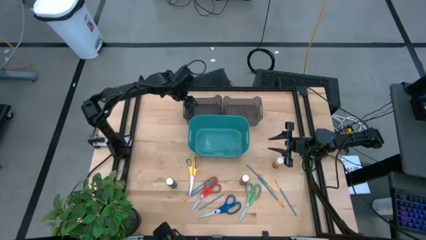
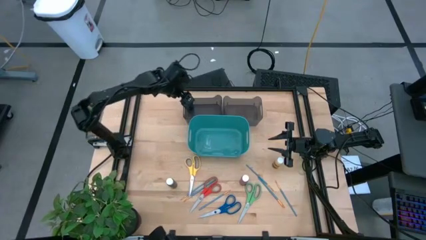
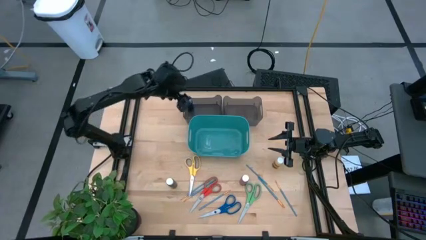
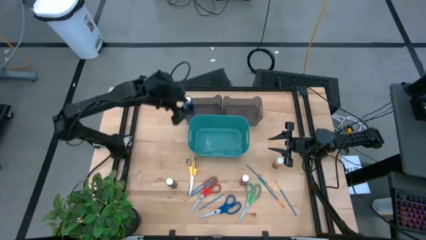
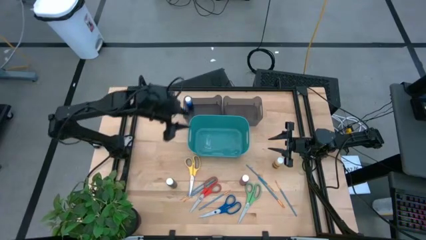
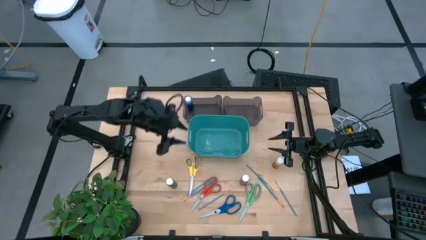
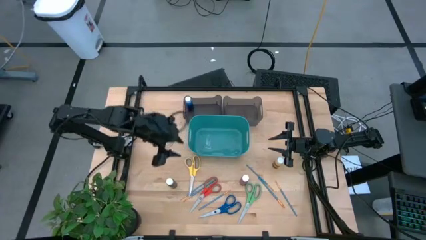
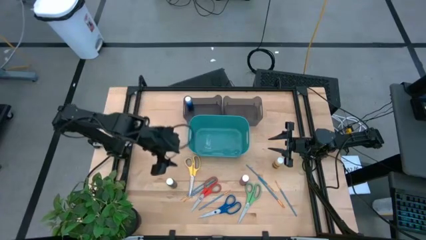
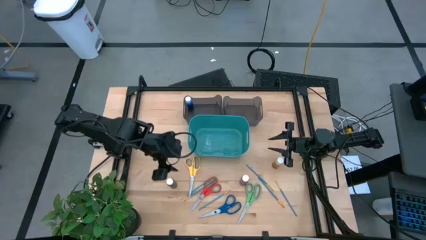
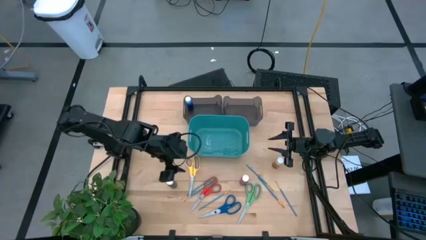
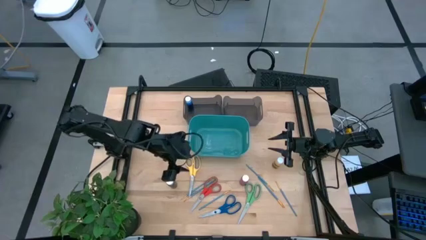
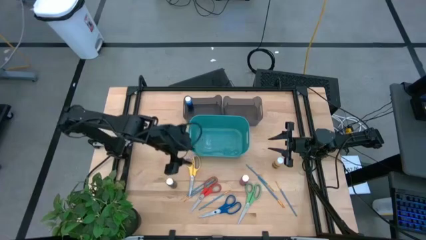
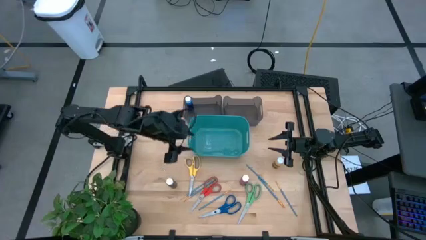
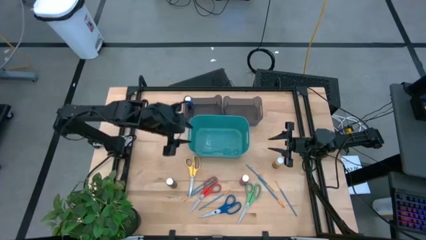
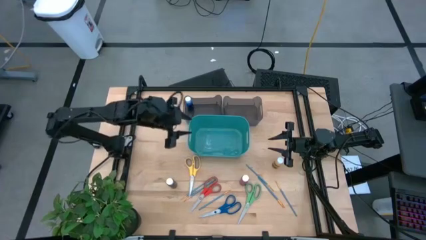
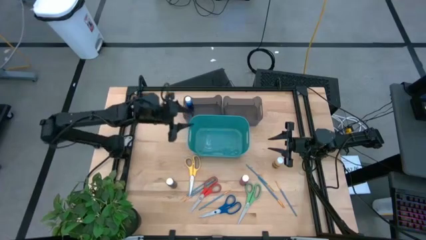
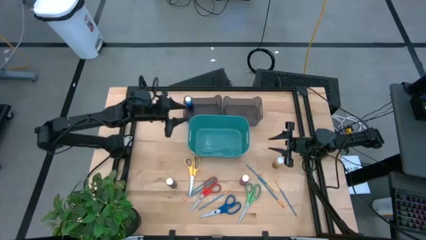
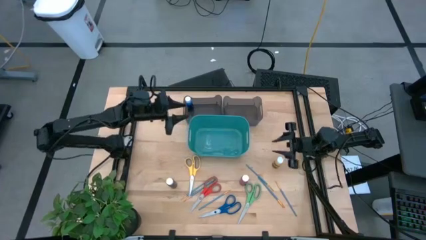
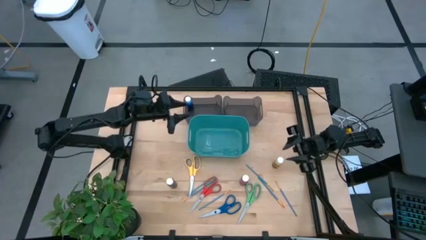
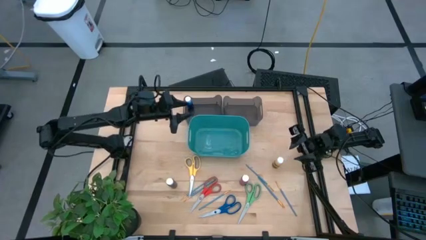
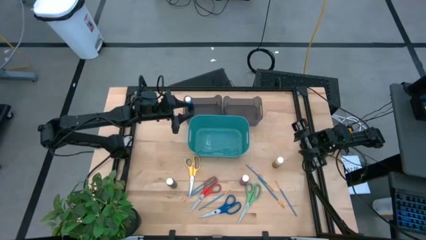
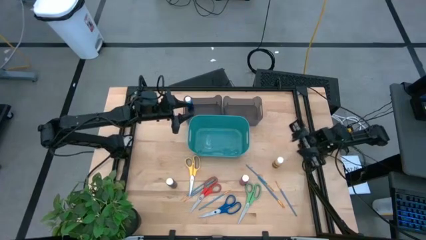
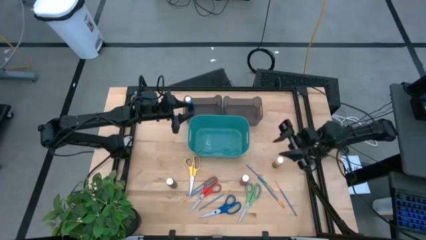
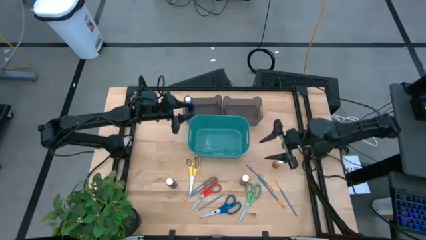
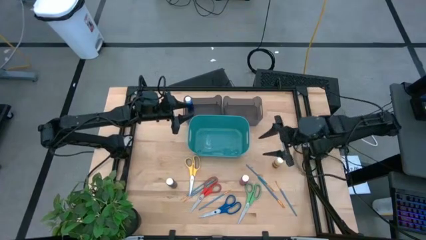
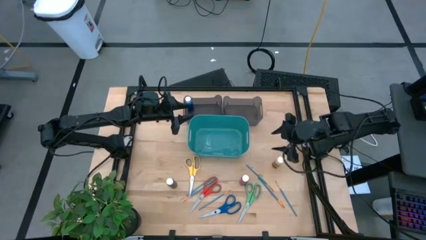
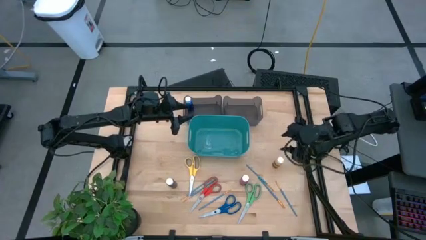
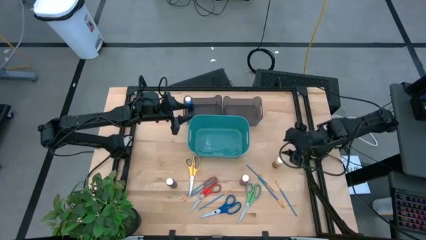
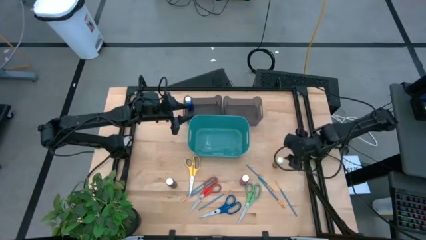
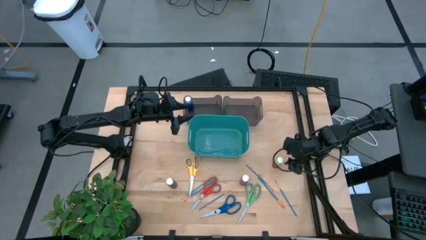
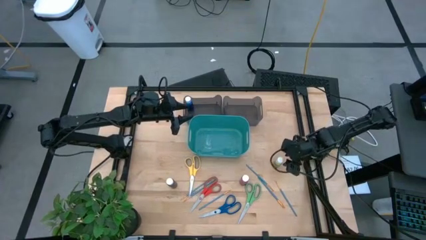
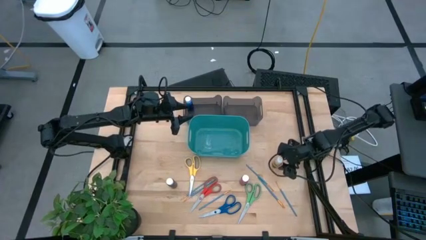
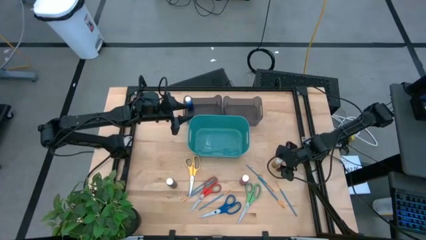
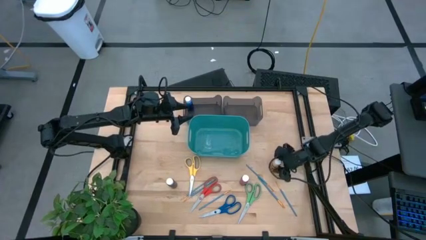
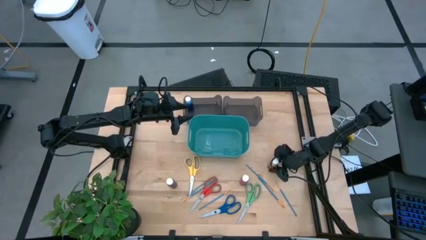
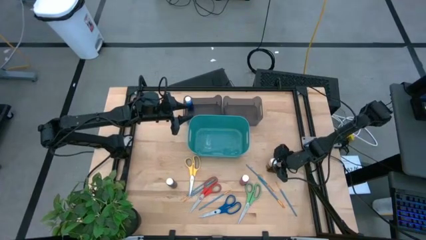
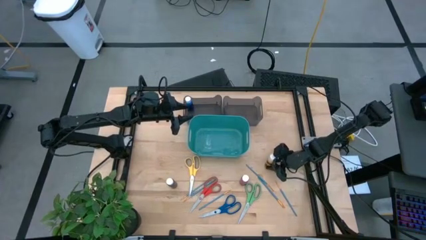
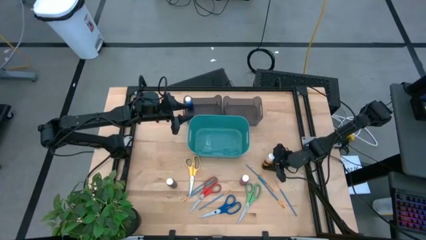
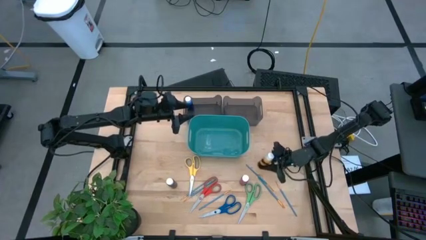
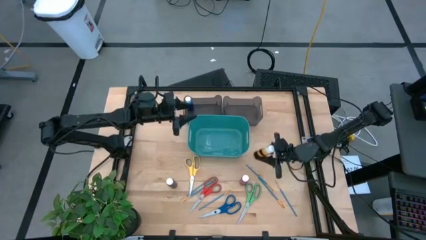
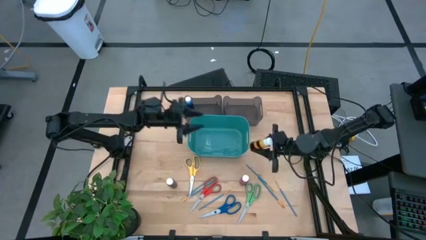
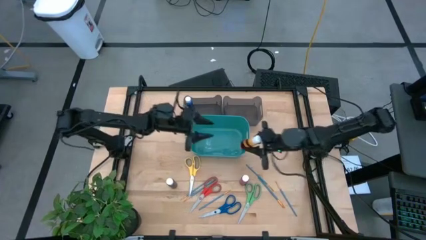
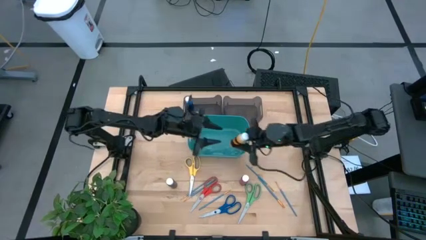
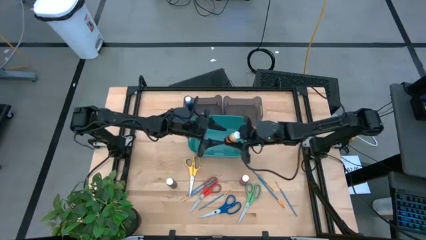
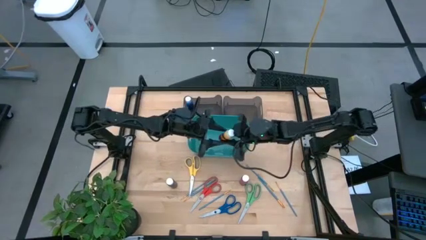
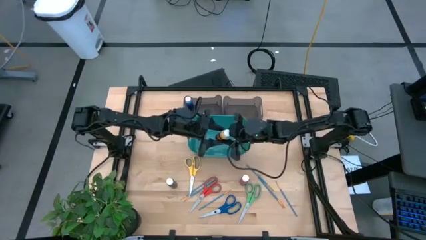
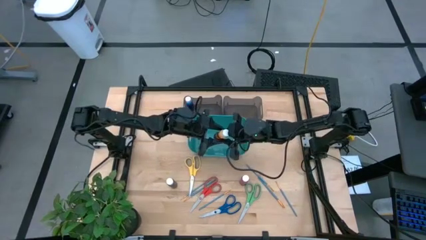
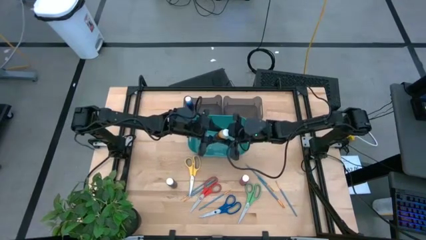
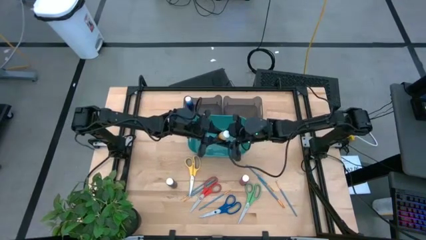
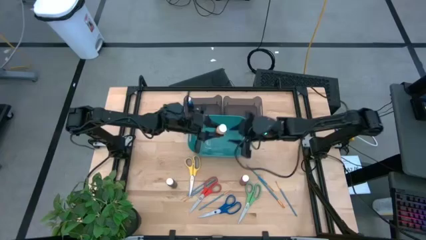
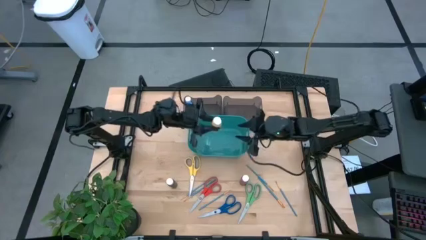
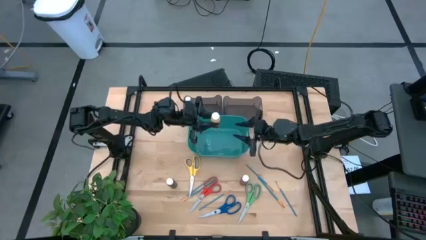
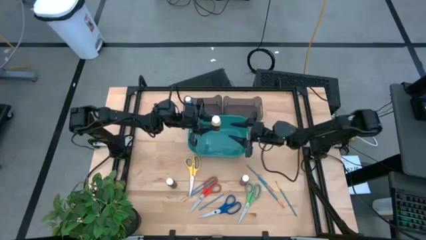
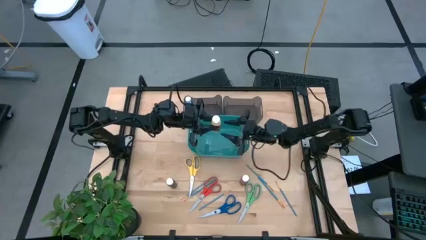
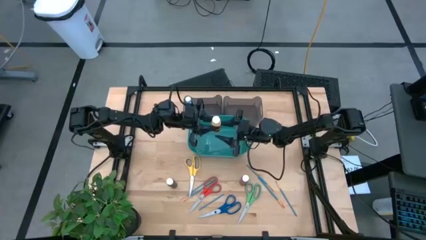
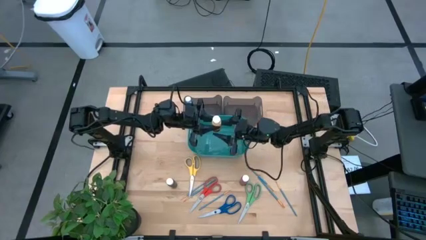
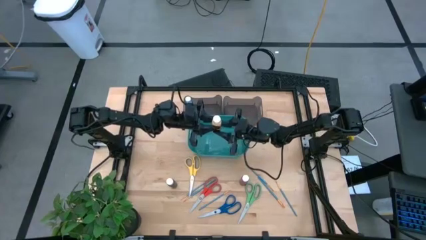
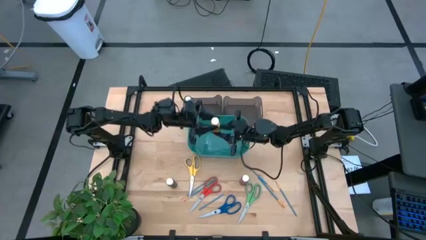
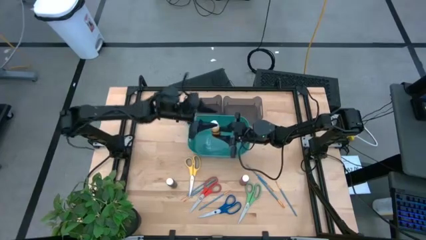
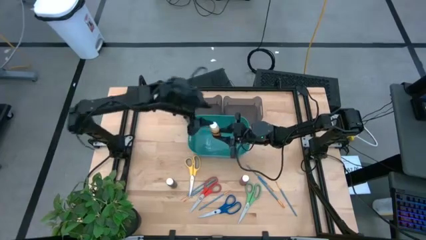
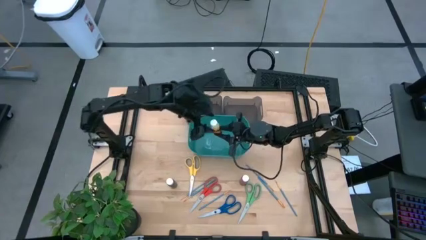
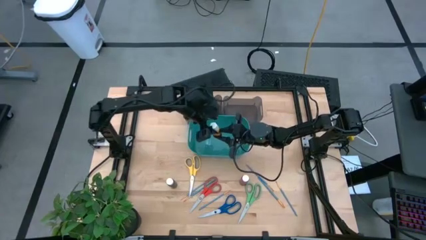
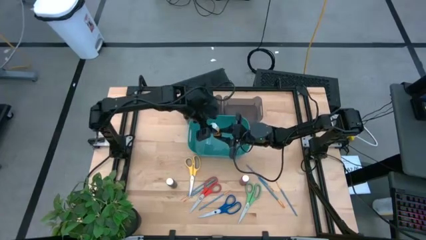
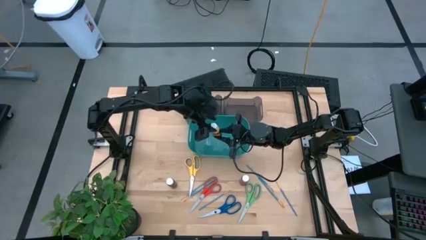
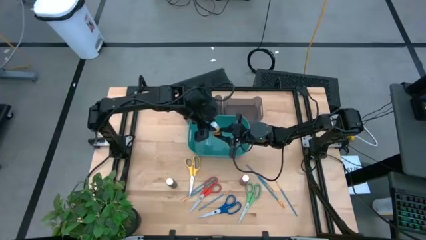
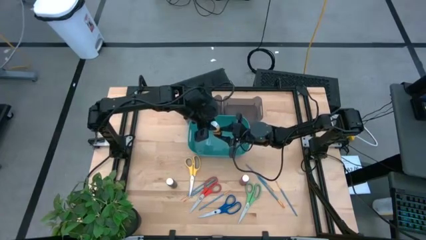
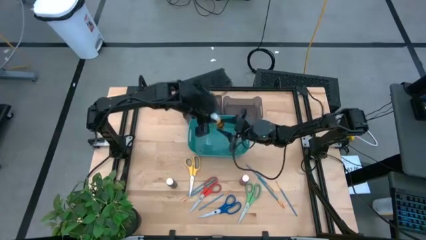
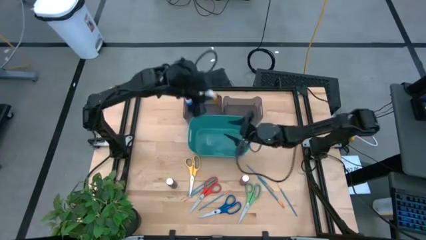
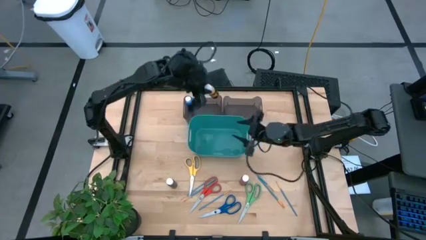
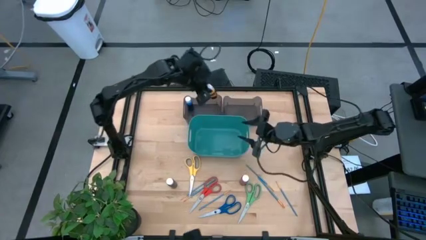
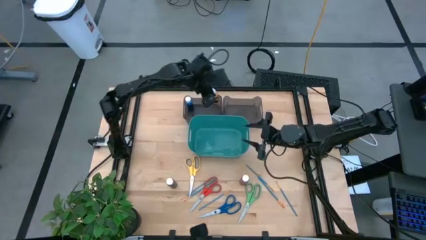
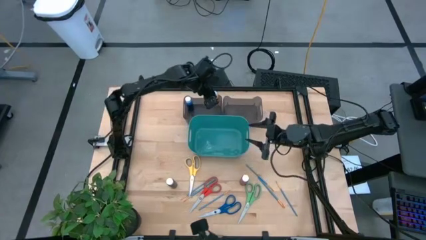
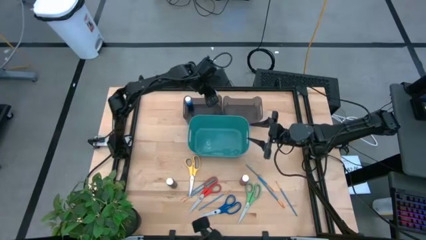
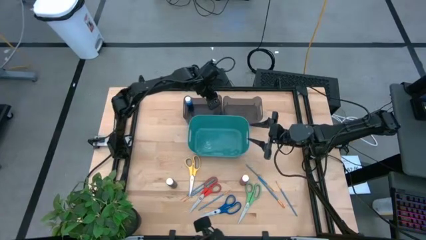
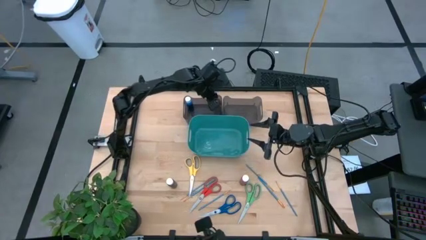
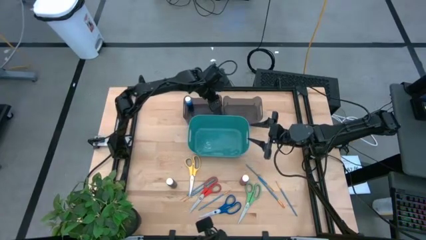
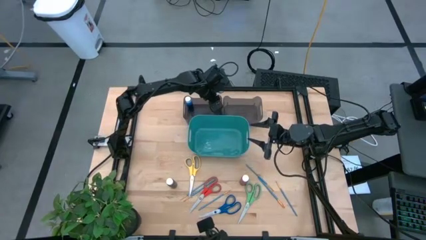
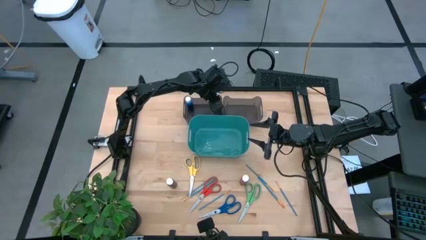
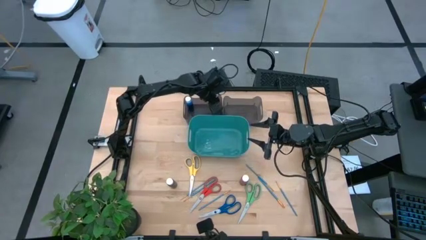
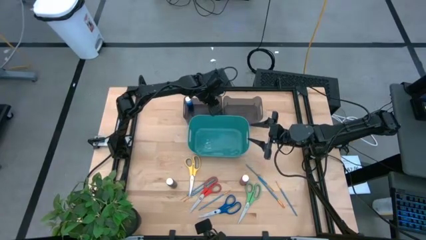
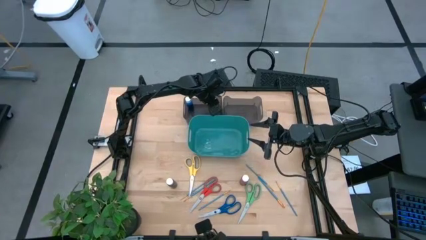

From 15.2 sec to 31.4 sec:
Task: Pick & Place Paint Supplies
Put the yellow paint bottle into the left black bin
